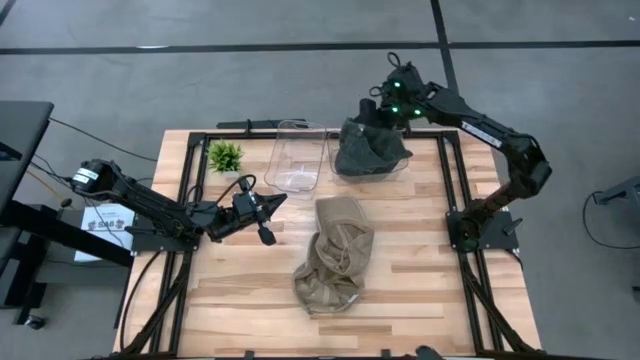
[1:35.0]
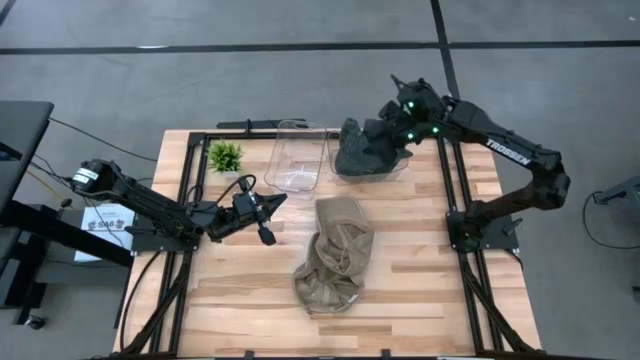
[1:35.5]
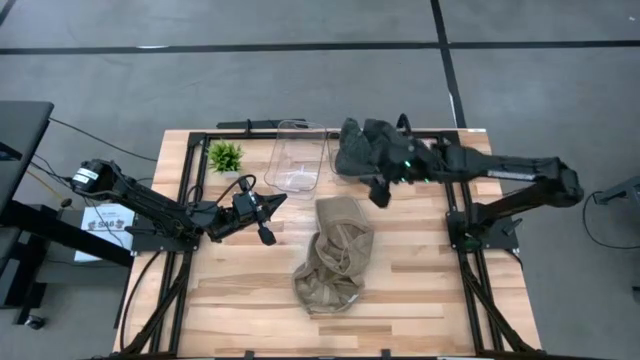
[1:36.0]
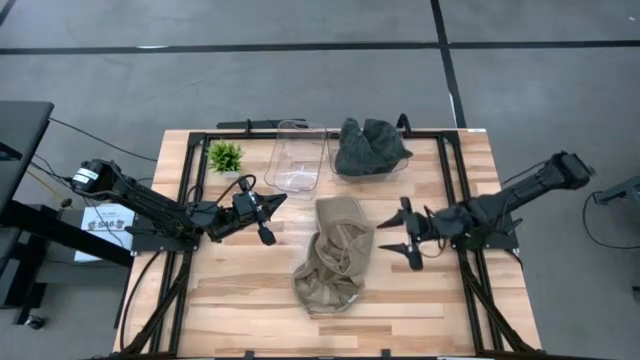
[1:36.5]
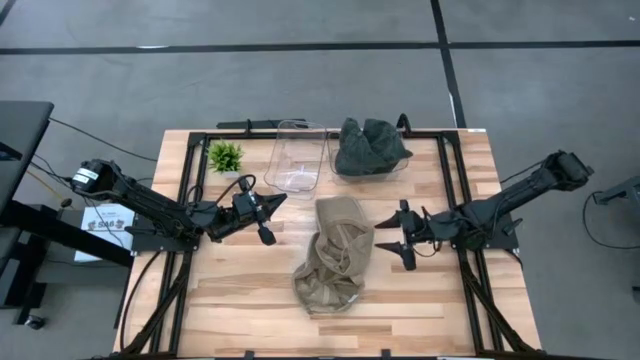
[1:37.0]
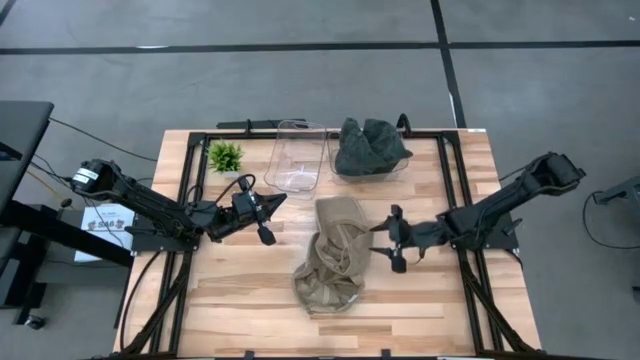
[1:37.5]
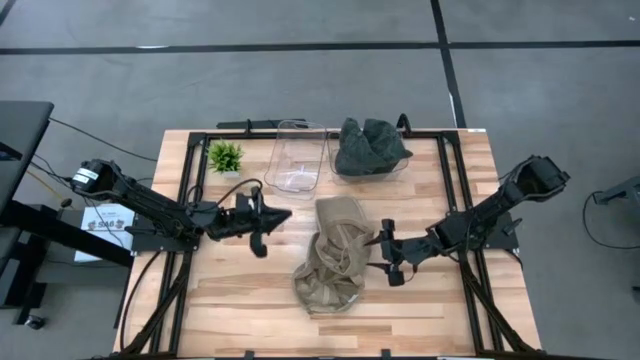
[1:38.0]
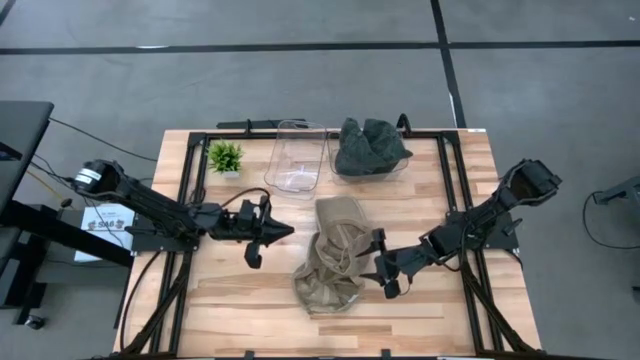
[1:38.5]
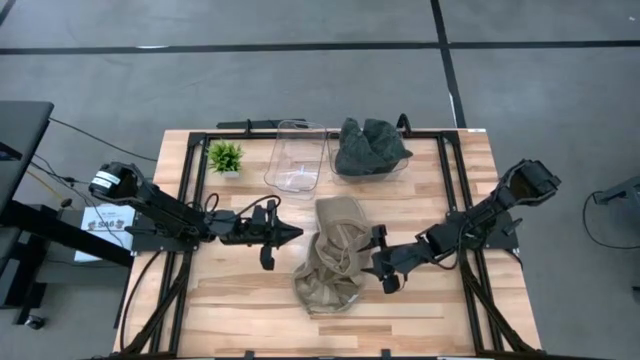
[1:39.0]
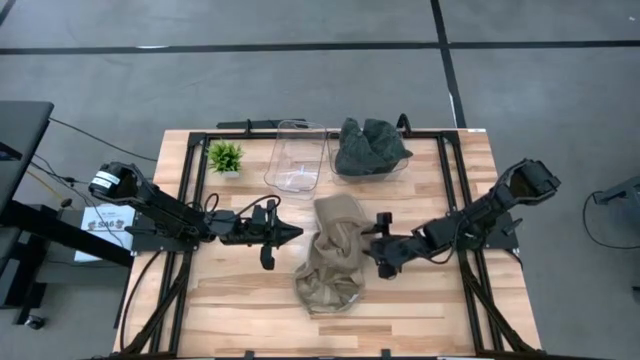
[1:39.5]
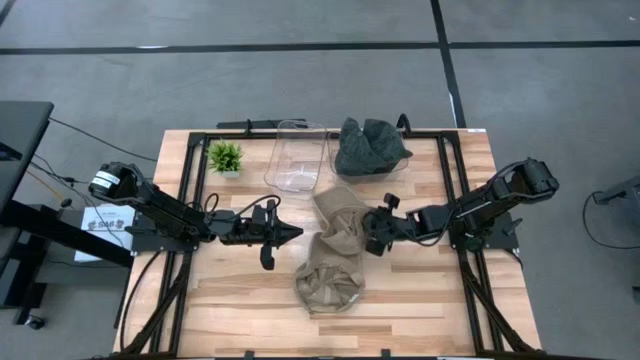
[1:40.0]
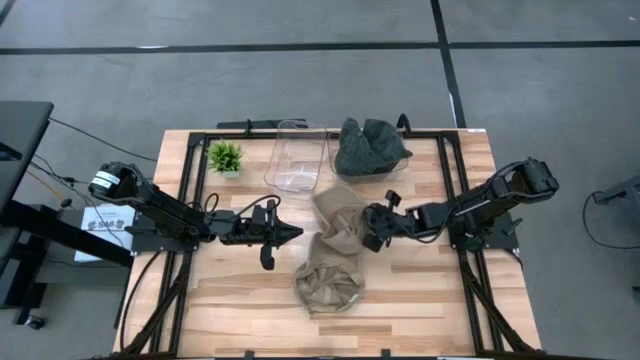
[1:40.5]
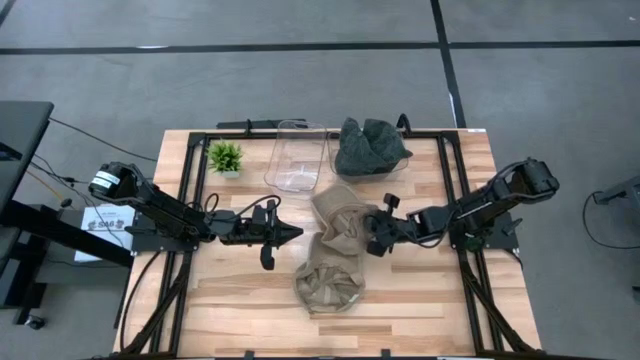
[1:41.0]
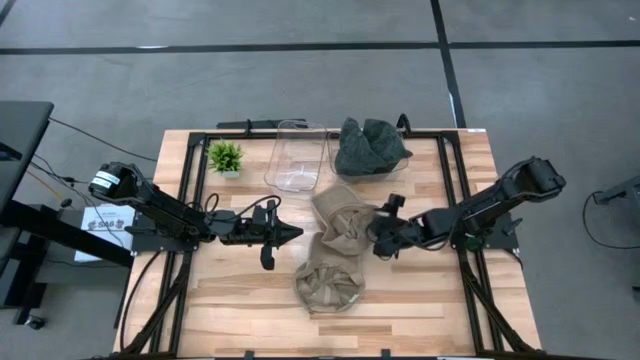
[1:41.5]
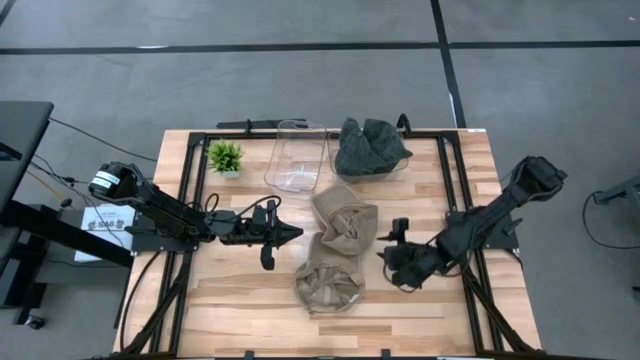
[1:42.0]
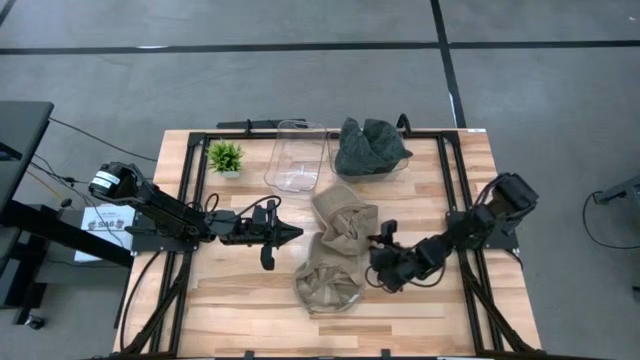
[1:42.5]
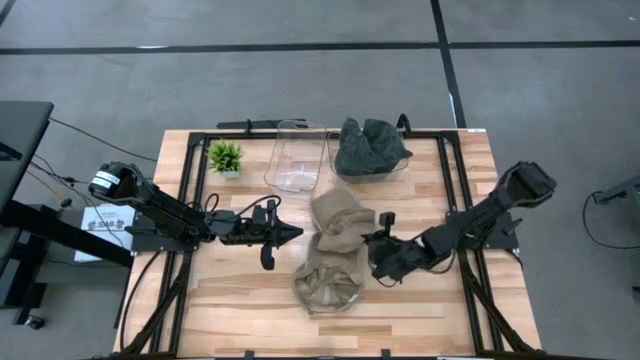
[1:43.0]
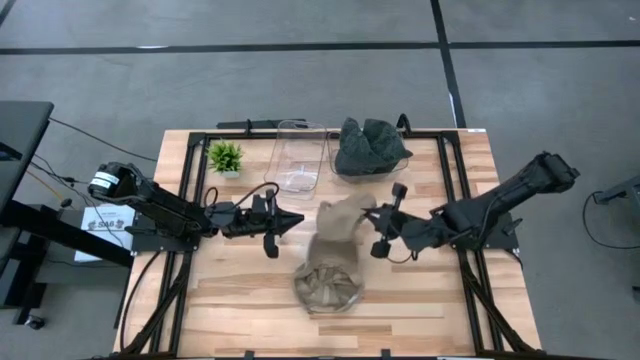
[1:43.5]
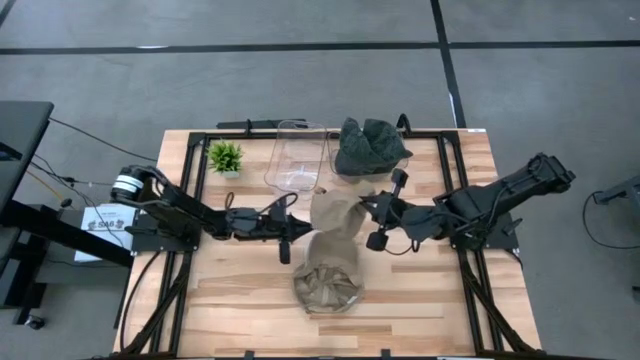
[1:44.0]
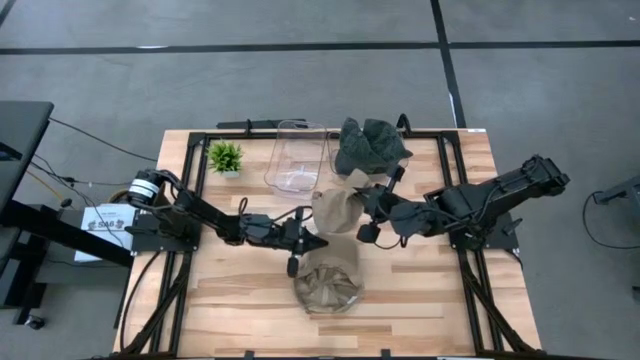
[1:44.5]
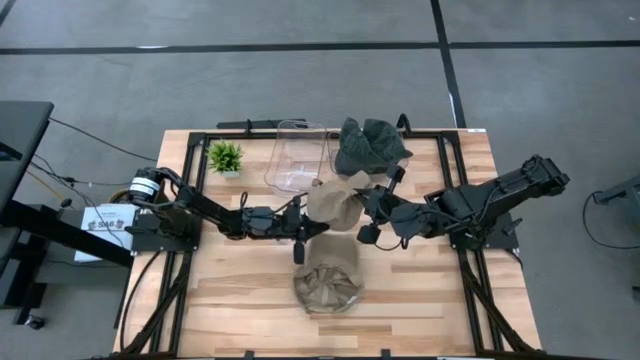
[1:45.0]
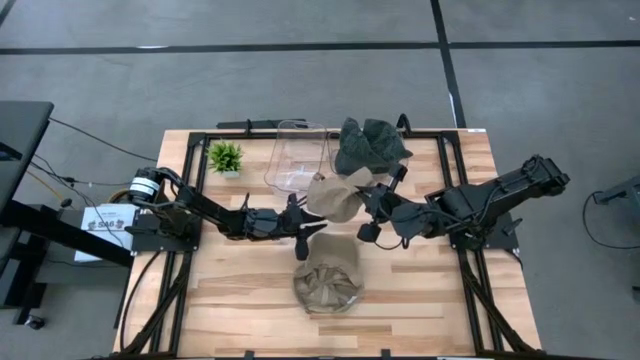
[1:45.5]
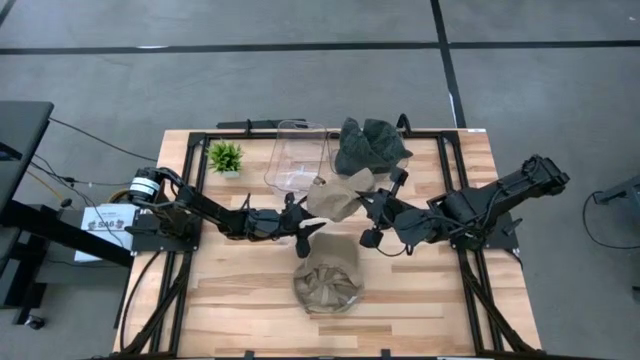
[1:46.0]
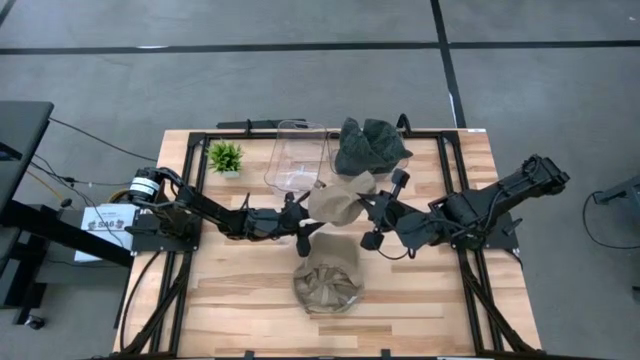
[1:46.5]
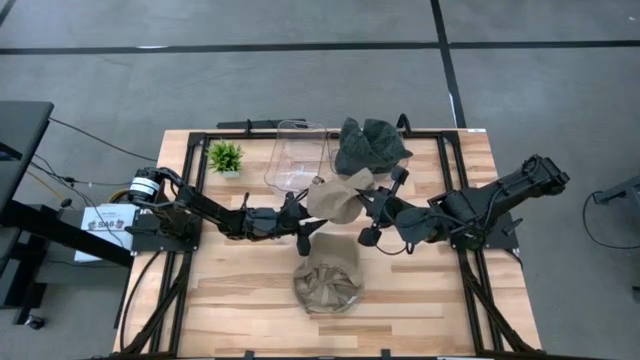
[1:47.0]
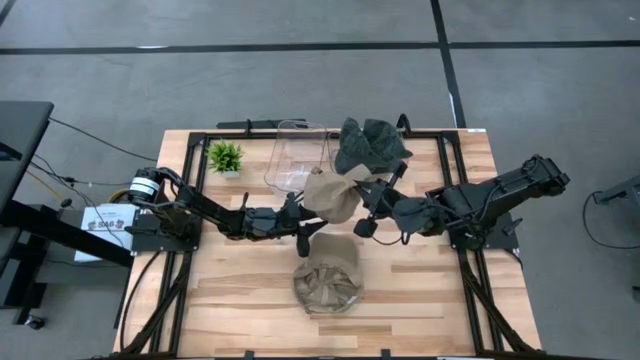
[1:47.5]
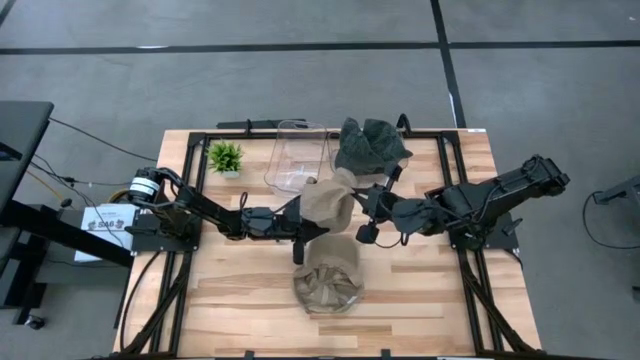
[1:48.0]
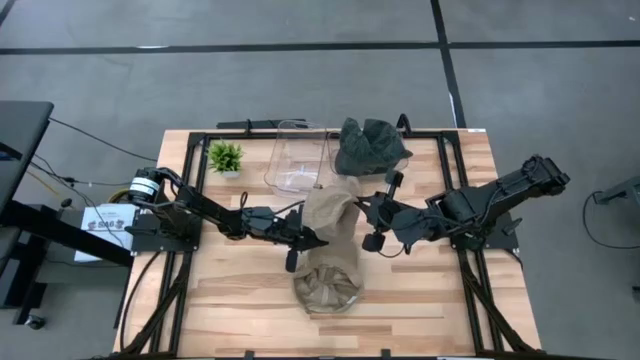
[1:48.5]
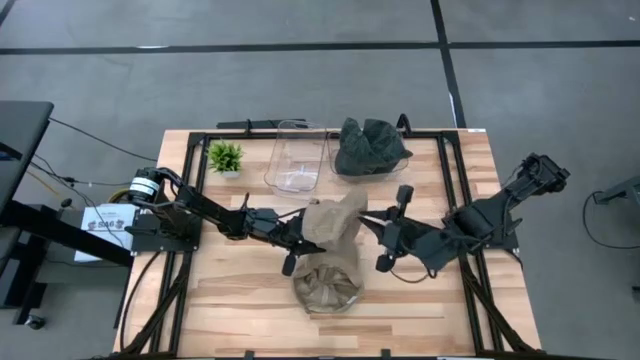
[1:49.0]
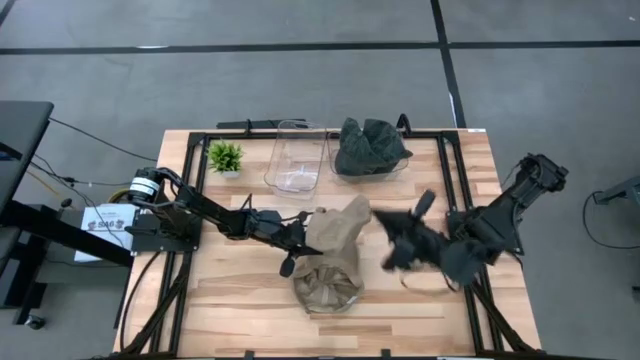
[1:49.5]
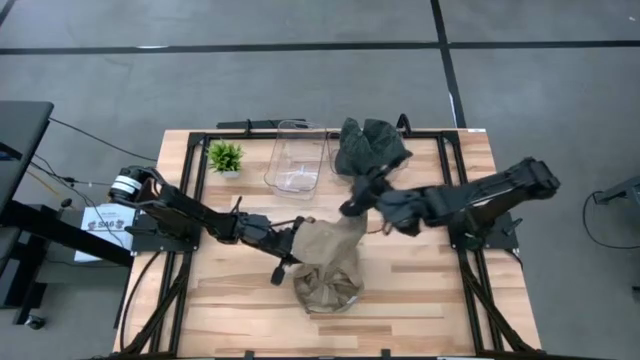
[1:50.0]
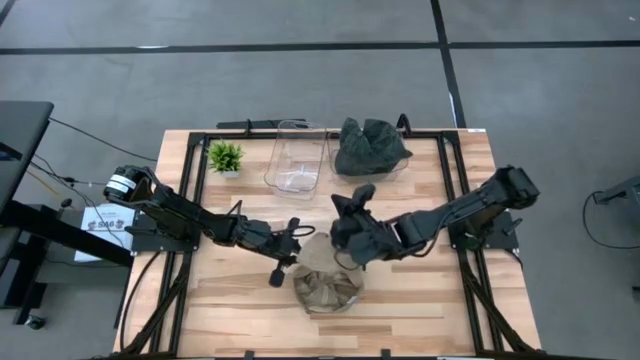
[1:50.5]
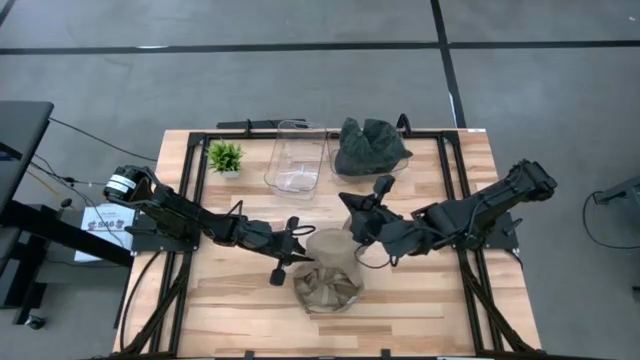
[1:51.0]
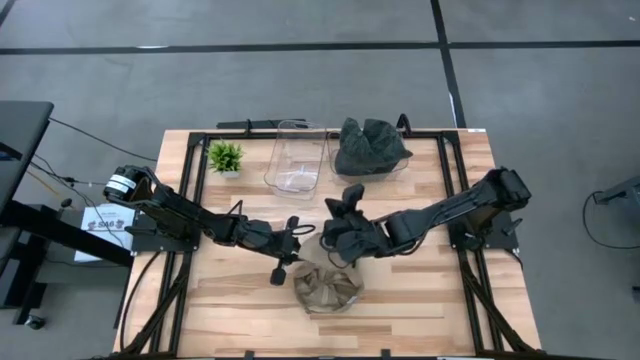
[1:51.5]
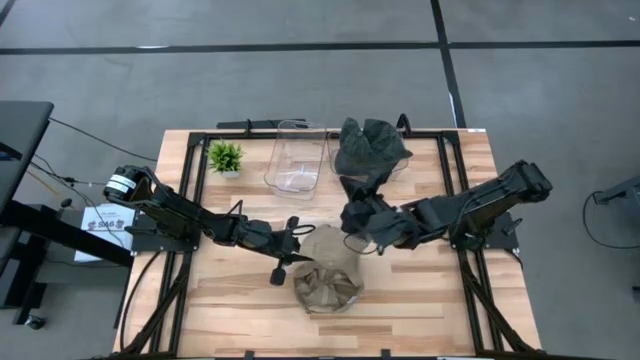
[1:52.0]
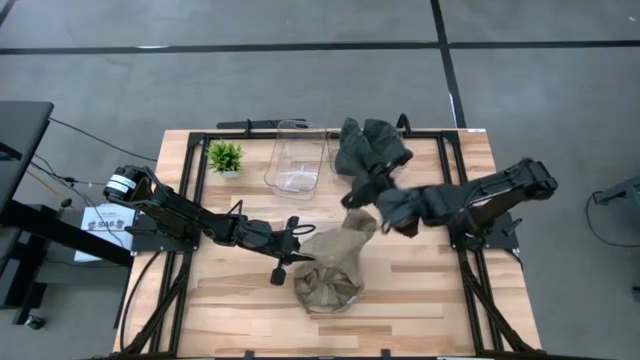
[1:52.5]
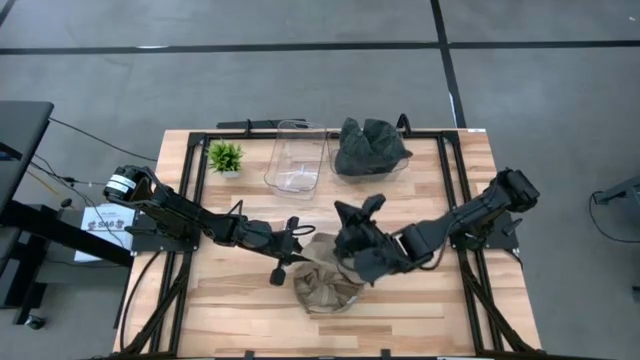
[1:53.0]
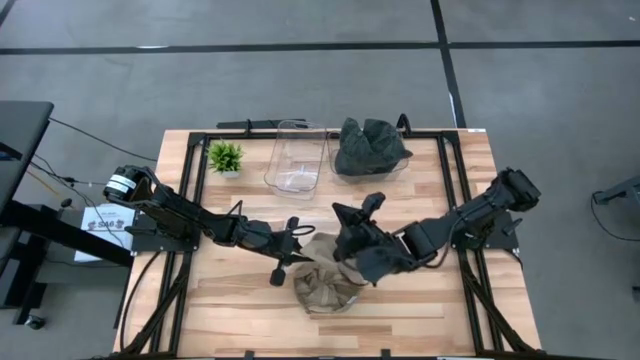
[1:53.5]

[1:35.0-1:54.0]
Task: Pick & Place hat
Put the top light brown cap into the left transparent bin
